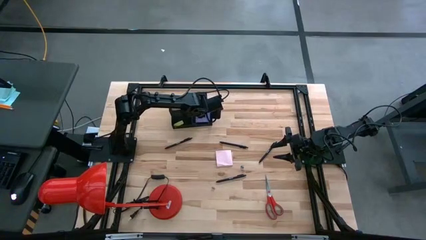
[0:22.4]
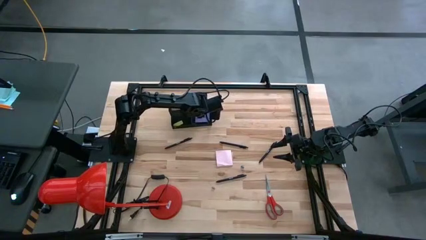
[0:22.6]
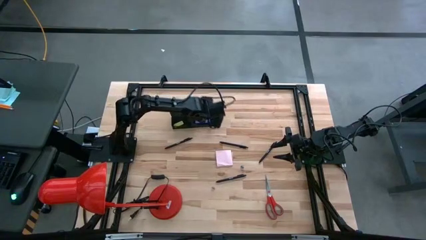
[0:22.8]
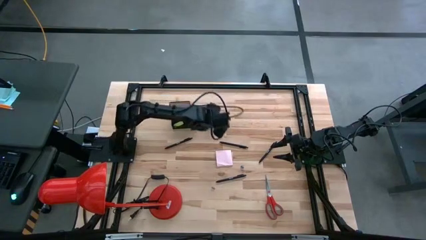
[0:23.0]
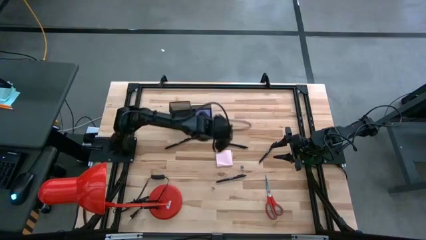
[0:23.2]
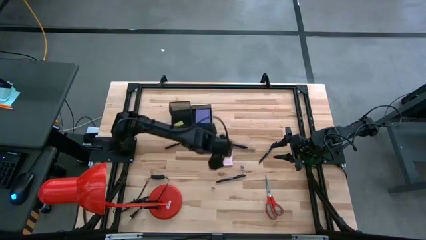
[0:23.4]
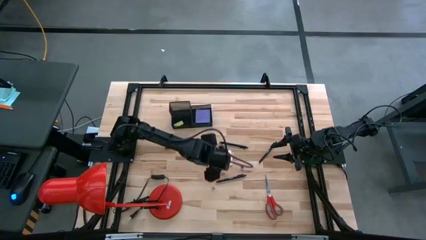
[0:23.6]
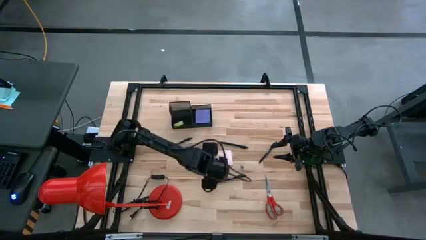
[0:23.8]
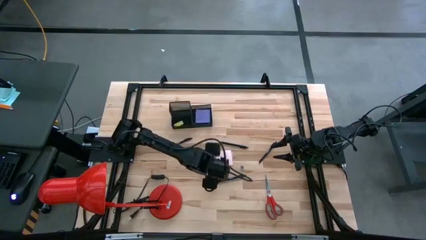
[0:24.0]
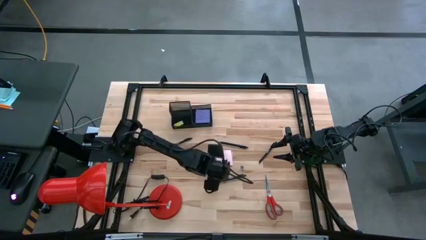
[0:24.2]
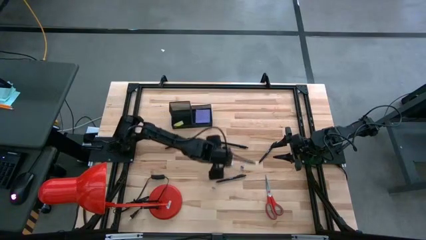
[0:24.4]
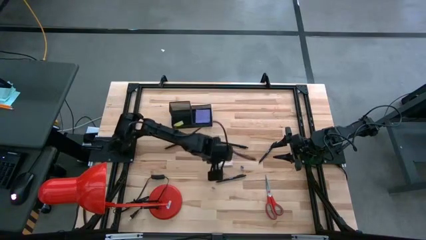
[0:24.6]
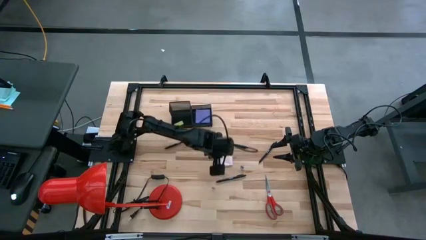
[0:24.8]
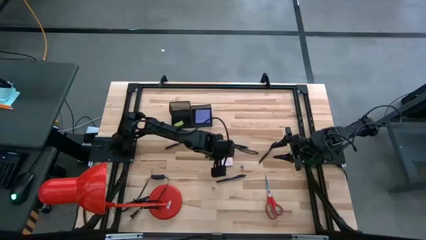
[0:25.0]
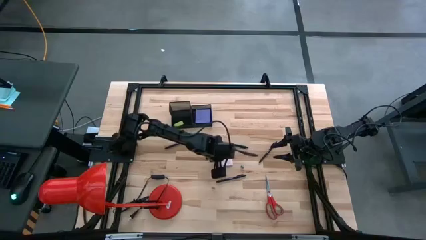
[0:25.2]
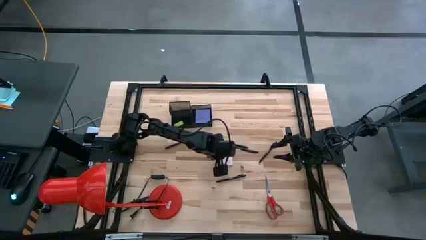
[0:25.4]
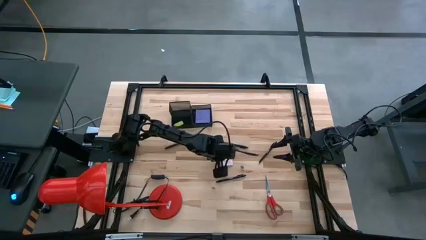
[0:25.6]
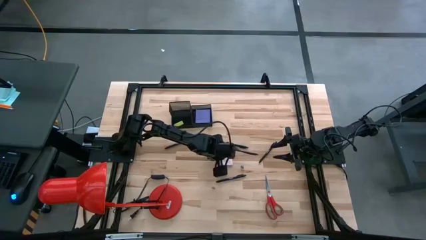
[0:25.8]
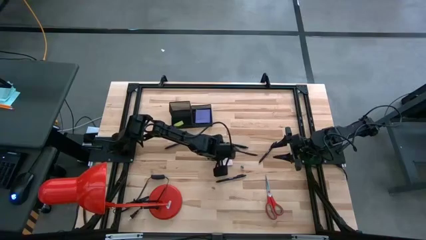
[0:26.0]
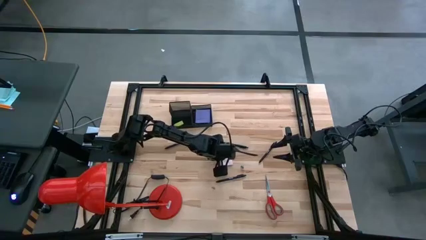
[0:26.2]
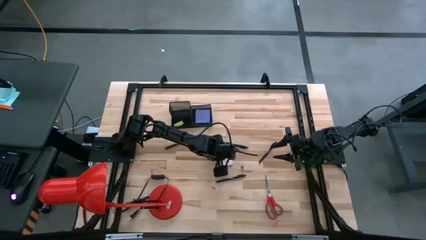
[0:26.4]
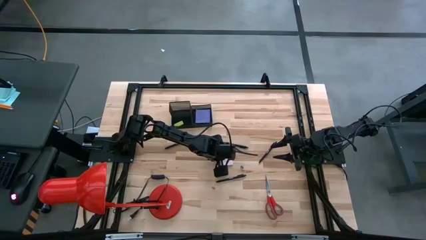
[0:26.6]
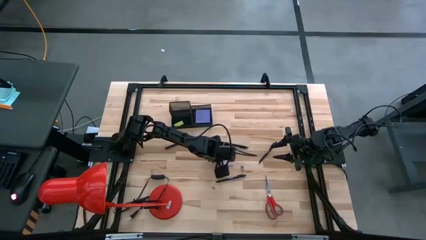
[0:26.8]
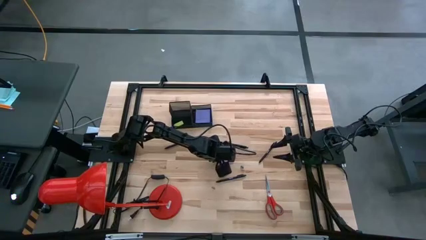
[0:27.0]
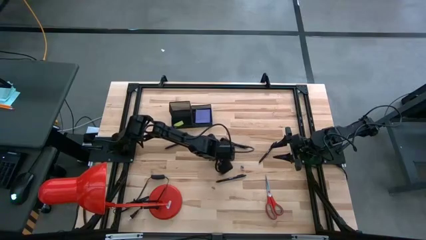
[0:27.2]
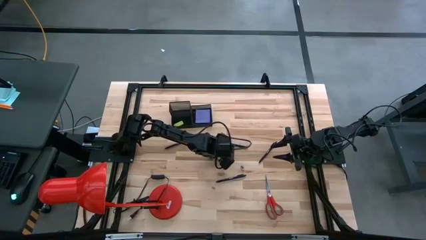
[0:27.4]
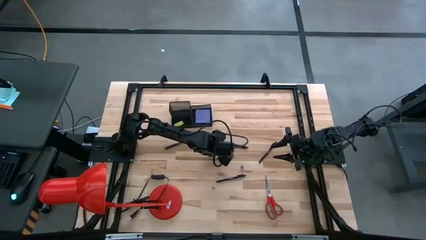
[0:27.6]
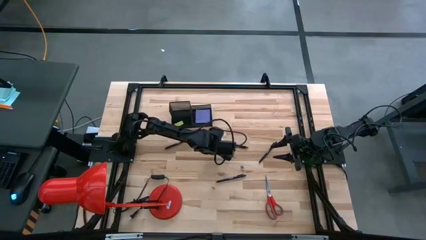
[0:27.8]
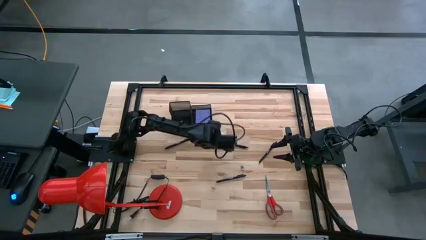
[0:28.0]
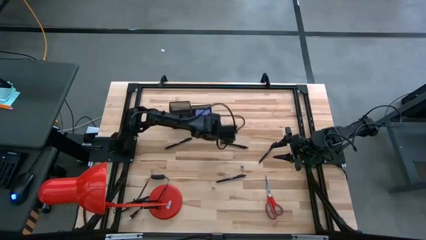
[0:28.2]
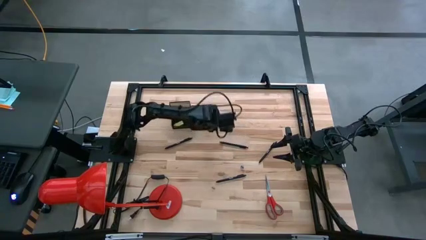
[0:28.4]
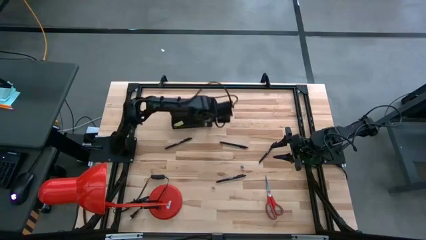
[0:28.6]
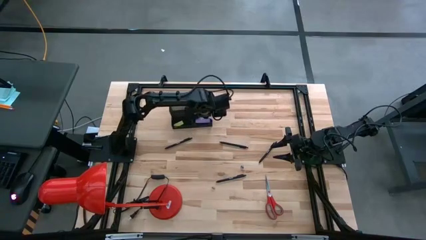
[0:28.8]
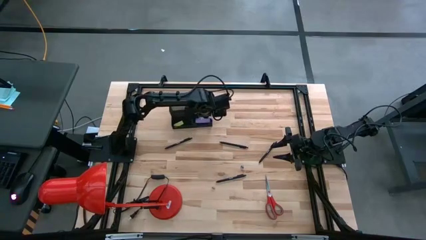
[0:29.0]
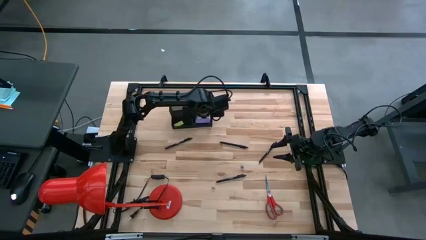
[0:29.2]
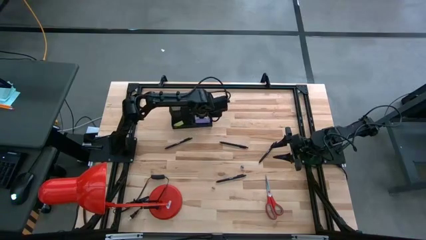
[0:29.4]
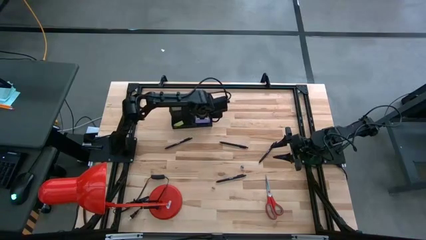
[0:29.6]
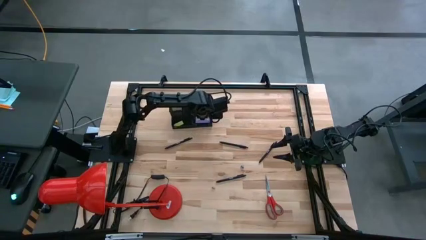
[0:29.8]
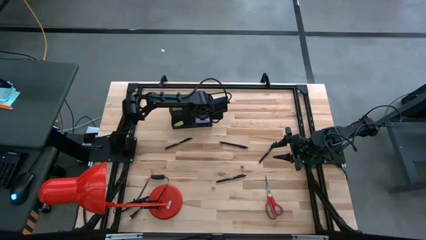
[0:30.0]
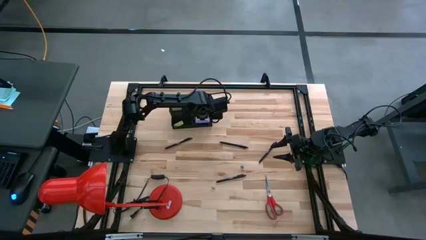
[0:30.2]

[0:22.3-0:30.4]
Task: Pick and place office supplies into organizer
Put the pink sticky note into the desk organizer

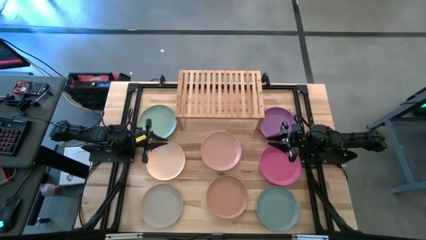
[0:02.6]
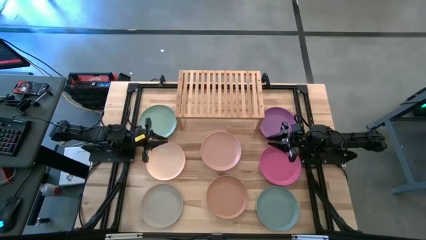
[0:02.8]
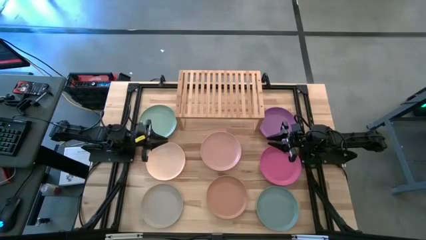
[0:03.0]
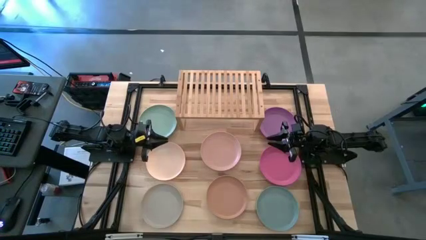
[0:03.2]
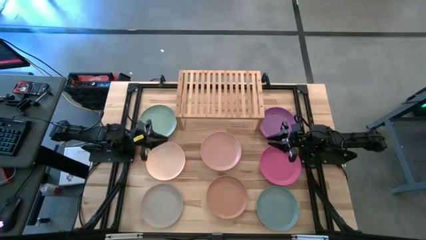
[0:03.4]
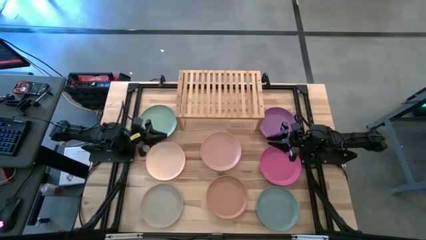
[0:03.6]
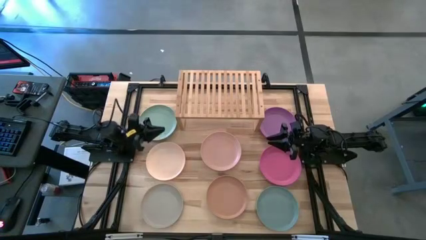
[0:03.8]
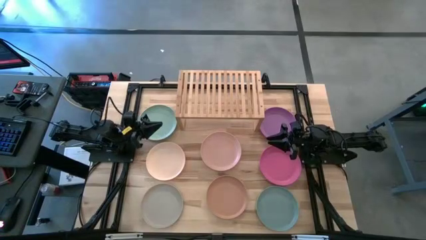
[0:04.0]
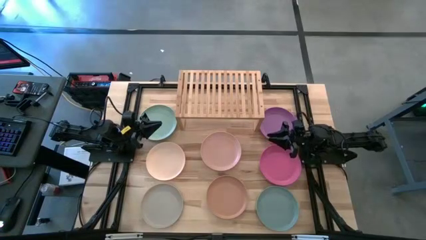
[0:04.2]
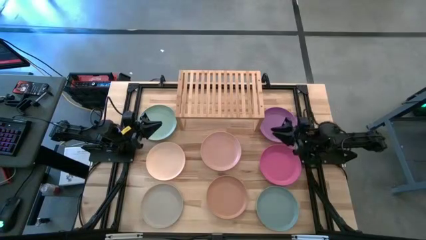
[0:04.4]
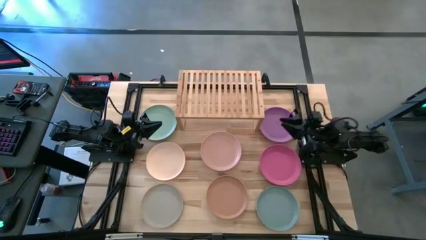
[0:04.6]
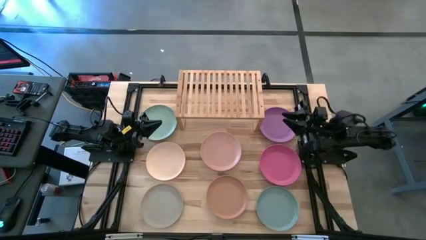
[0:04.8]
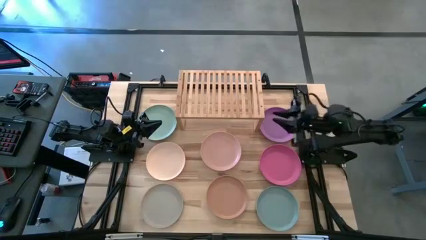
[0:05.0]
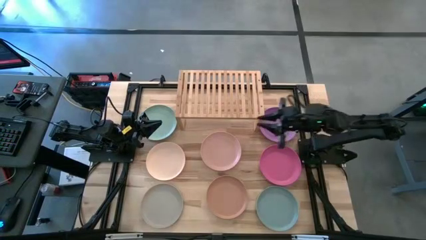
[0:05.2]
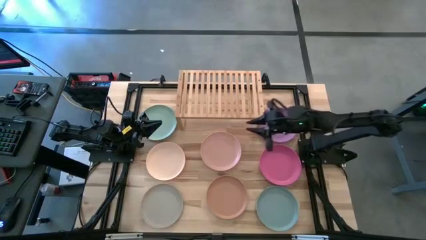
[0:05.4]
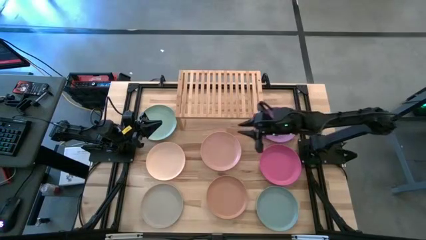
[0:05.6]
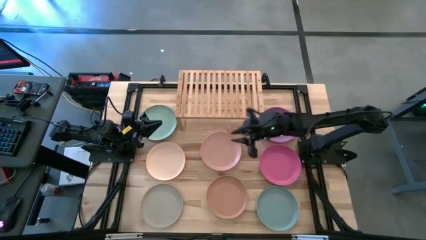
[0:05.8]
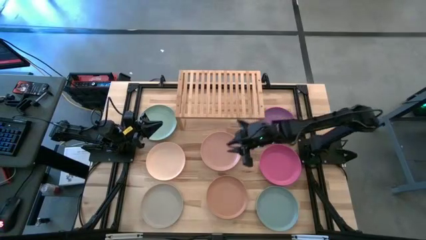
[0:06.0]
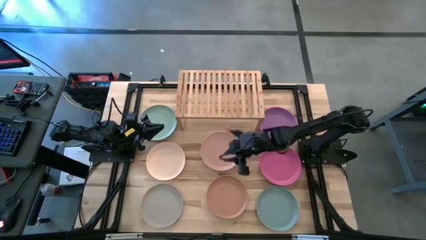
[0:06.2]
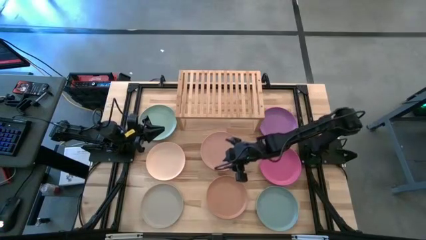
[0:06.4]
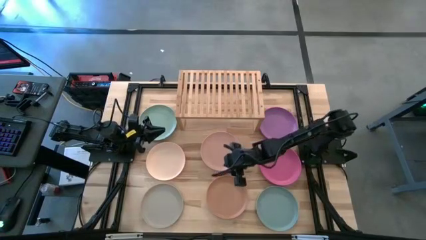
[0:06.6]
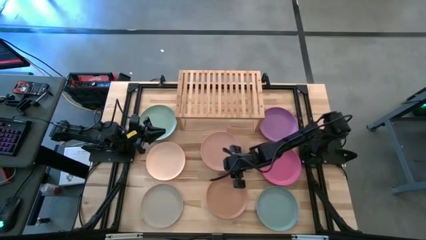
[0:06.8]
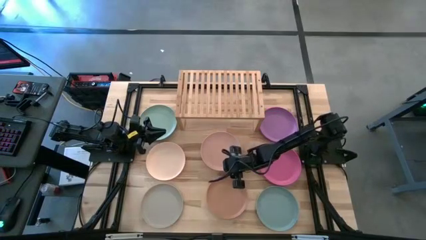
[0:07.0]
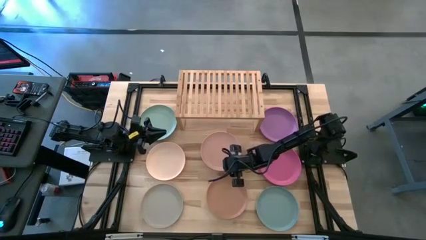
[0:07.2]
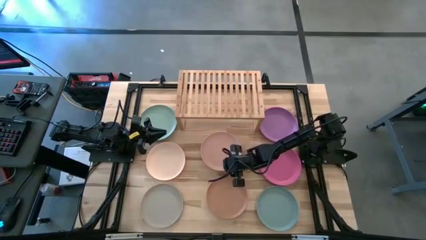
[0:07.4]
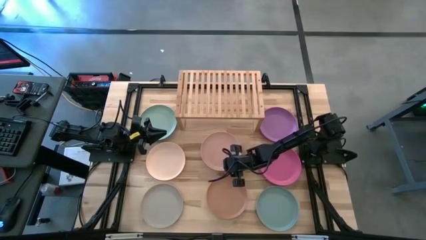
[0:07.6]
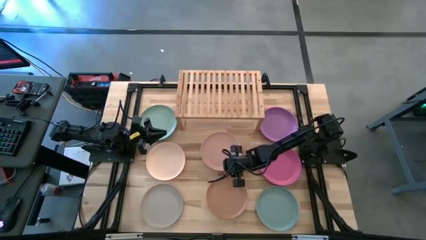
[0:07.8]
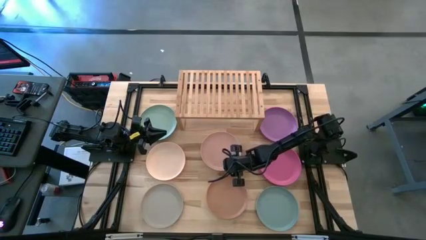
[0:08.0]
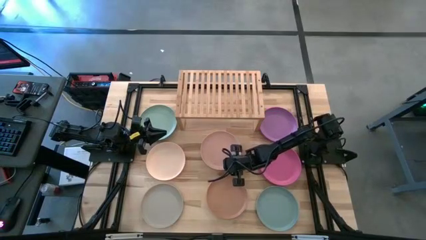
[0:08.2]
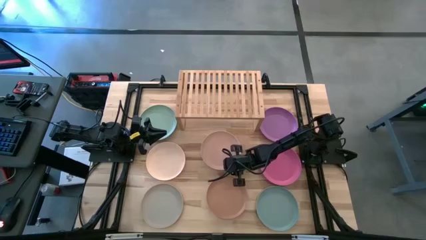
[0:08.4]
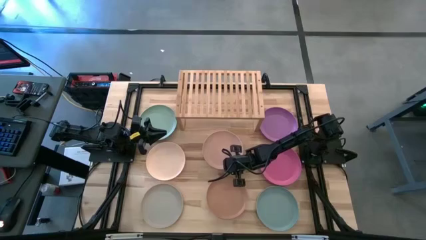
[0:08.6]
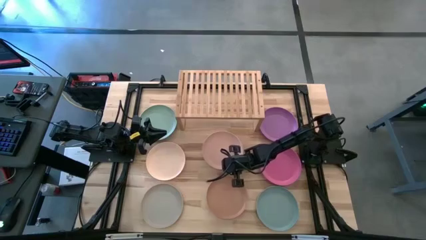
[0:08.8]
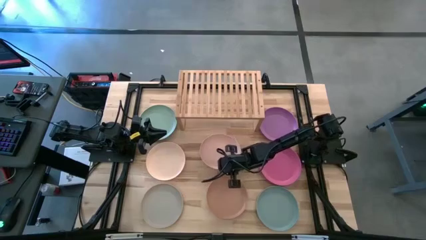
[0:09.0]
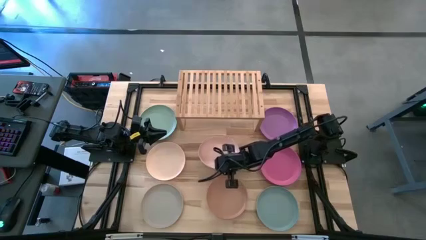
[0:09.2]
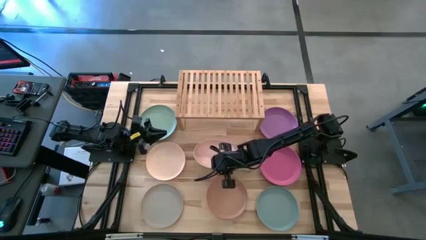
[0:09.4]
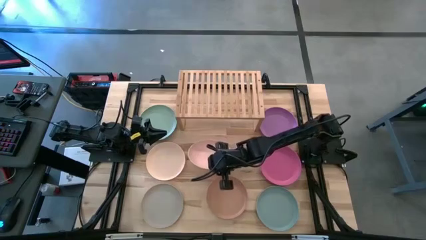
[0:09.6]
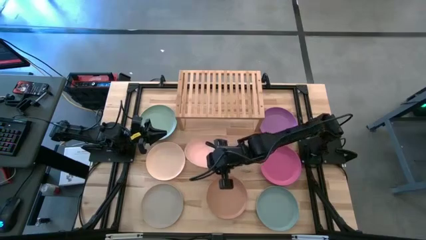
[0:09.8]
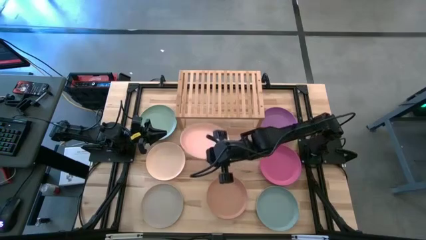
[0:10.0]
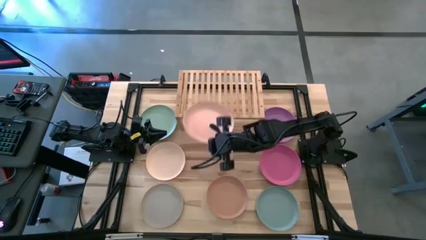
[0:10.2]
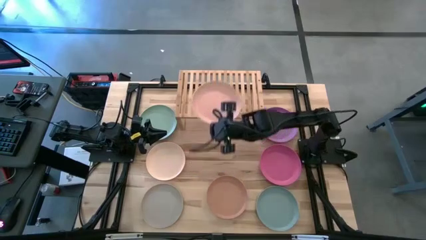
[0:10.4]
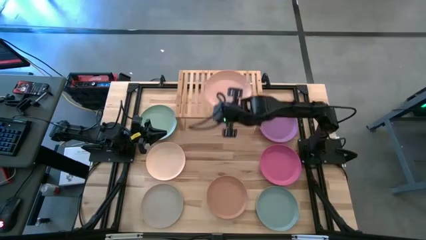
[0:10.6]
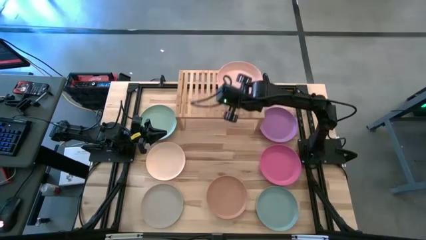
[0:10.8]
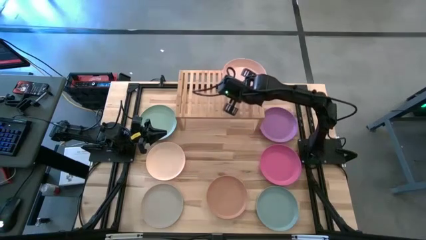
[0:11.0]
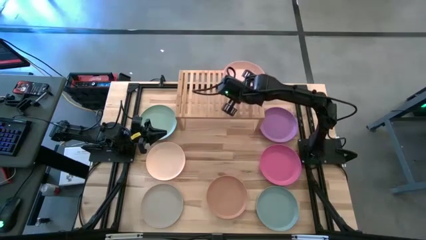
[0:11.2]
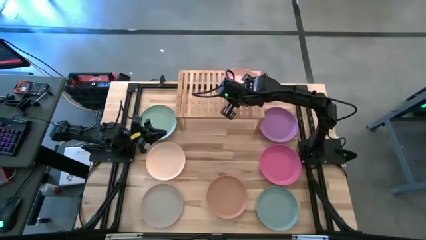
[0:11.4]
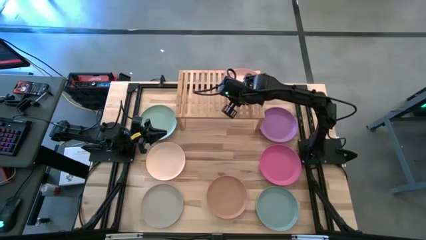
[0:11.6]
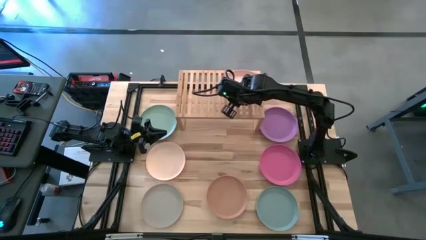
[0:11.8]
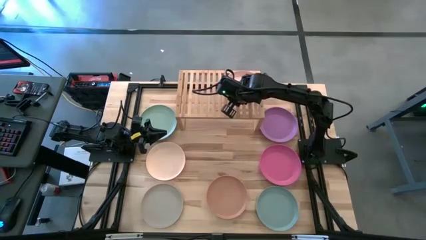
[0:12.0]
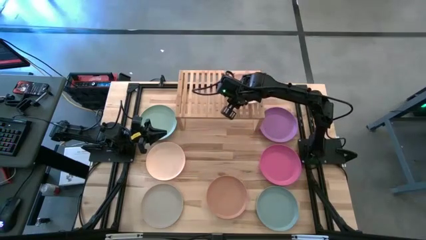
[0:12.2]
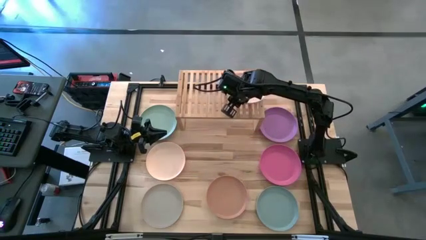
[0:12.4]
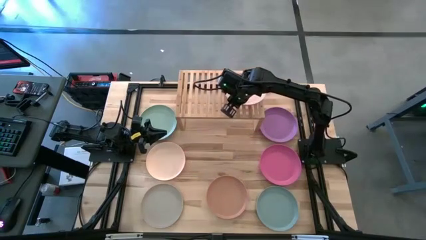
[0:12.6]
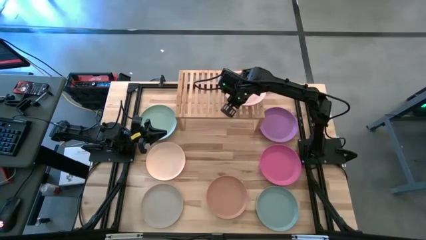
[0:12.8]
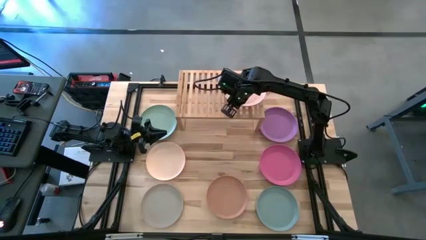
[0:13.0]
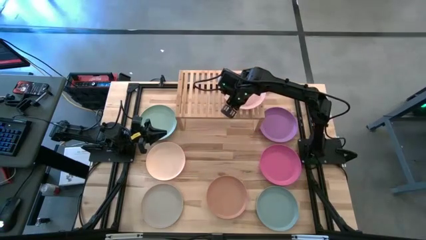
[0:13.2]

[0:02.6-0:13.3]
Task: Place and stack plates onto a shelf
Put the light pink plate on the shelf
